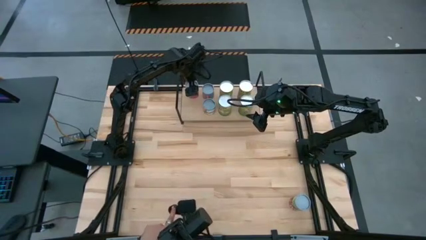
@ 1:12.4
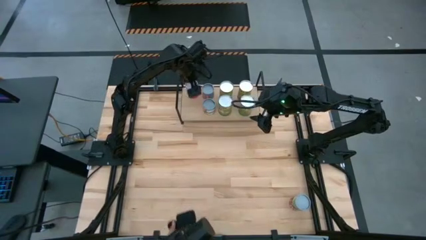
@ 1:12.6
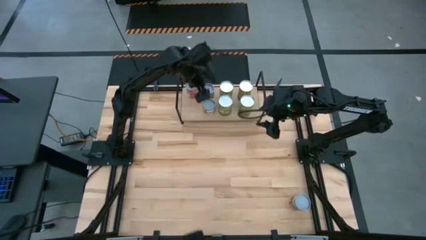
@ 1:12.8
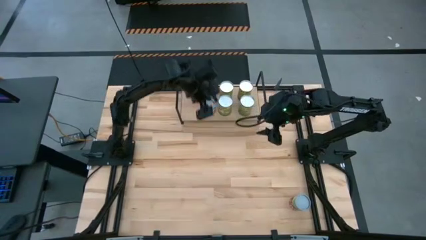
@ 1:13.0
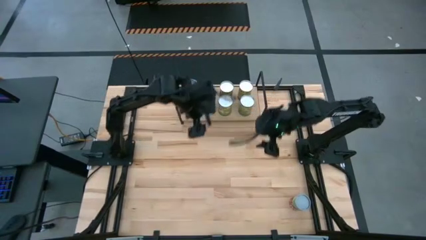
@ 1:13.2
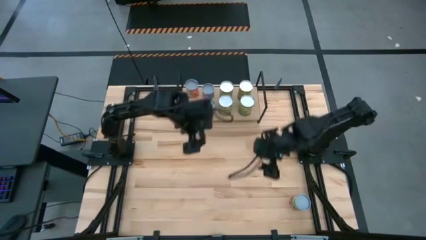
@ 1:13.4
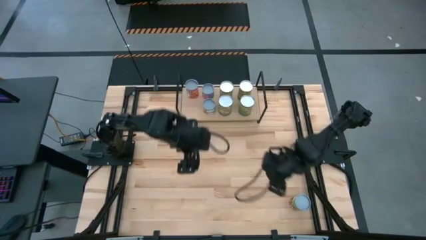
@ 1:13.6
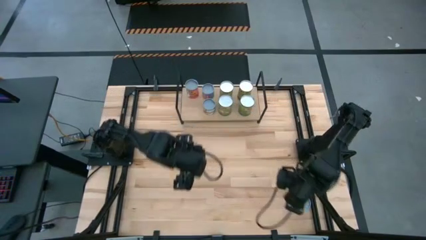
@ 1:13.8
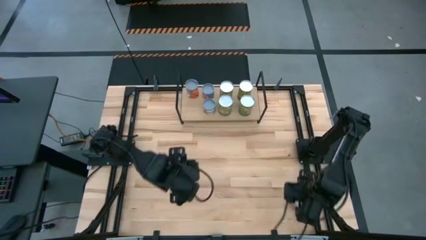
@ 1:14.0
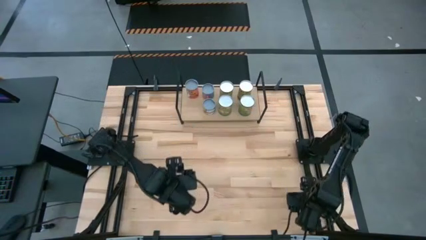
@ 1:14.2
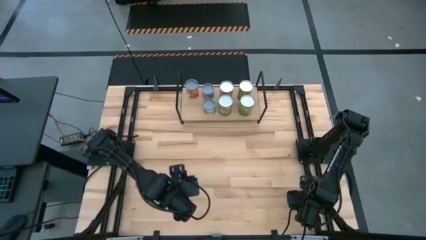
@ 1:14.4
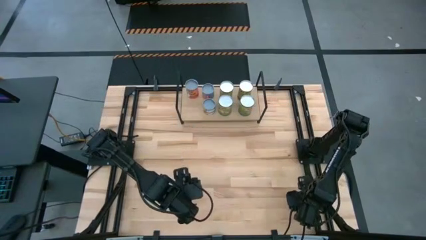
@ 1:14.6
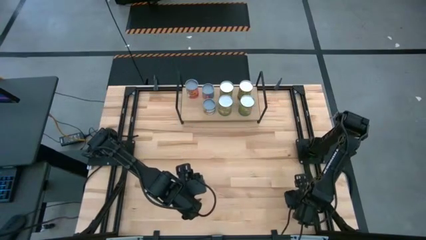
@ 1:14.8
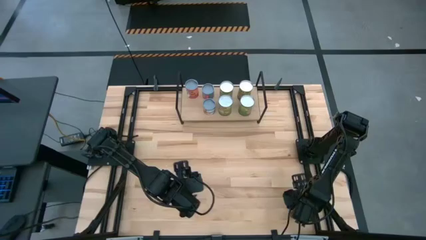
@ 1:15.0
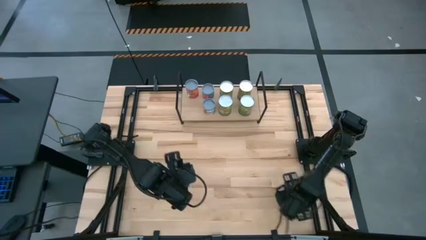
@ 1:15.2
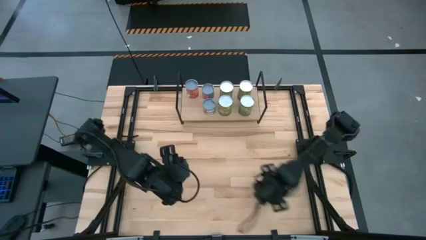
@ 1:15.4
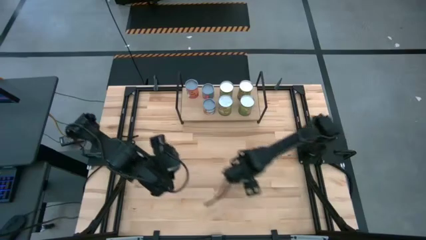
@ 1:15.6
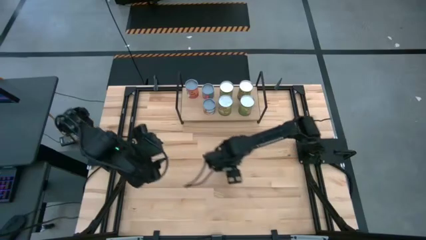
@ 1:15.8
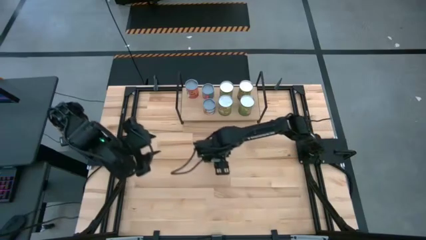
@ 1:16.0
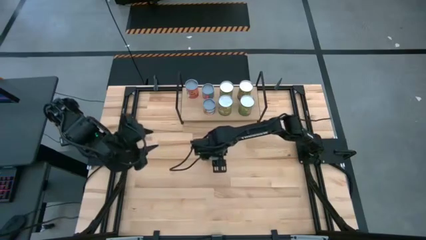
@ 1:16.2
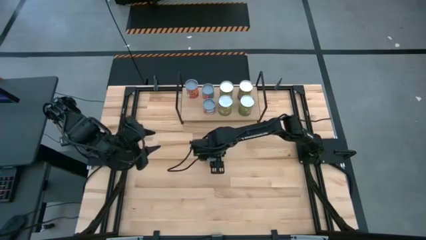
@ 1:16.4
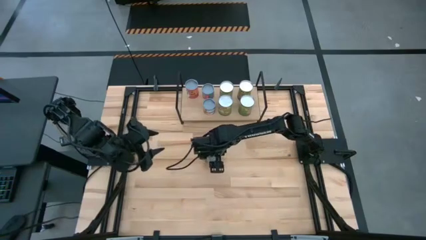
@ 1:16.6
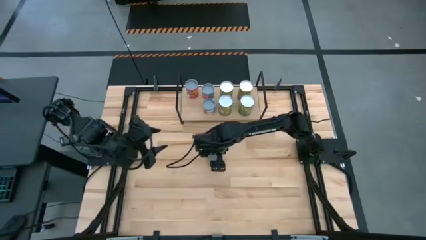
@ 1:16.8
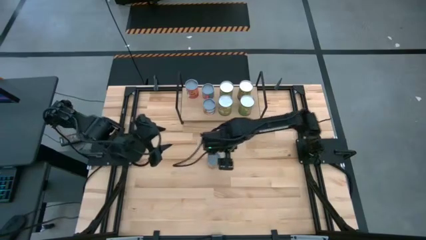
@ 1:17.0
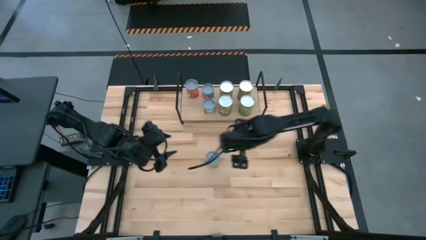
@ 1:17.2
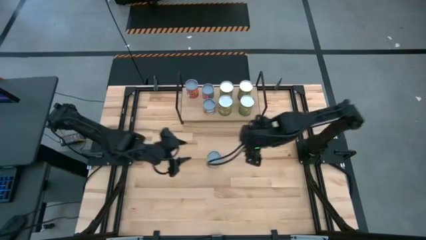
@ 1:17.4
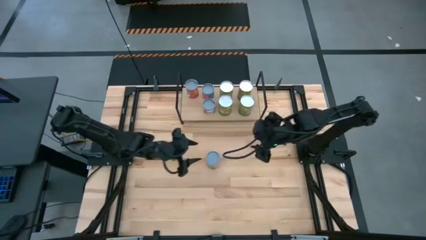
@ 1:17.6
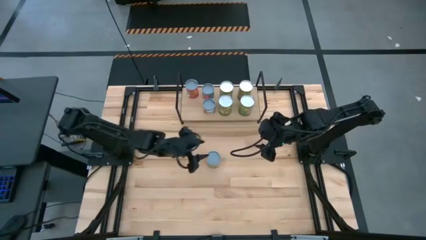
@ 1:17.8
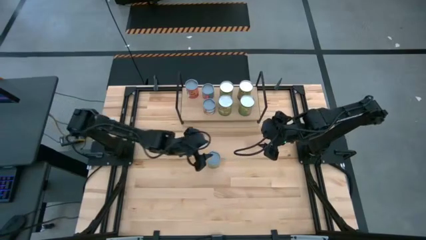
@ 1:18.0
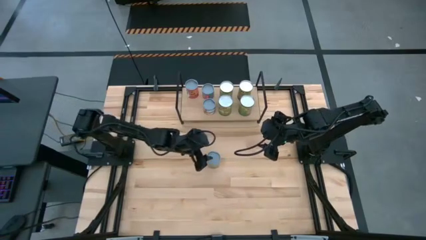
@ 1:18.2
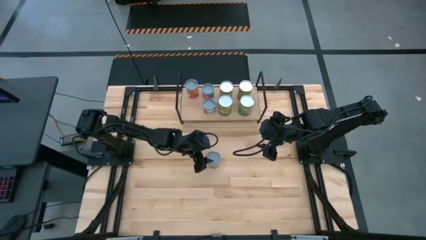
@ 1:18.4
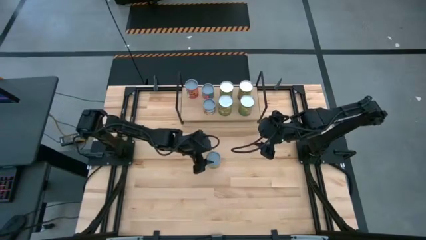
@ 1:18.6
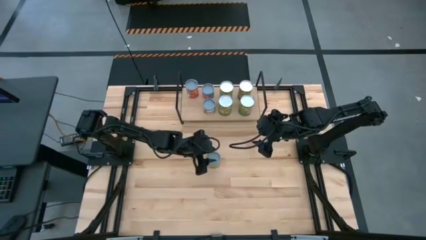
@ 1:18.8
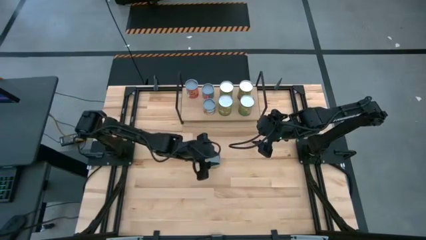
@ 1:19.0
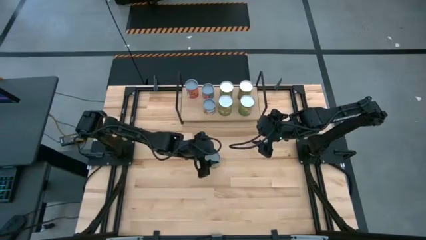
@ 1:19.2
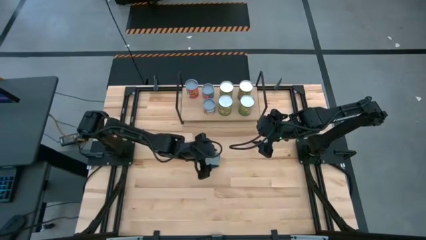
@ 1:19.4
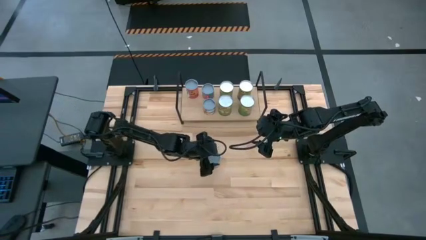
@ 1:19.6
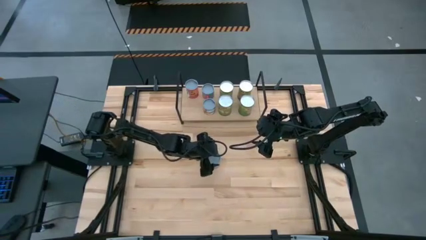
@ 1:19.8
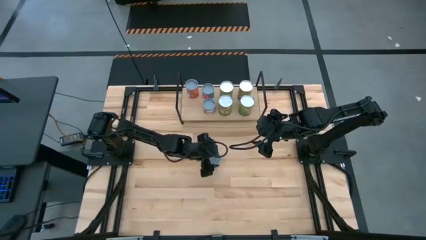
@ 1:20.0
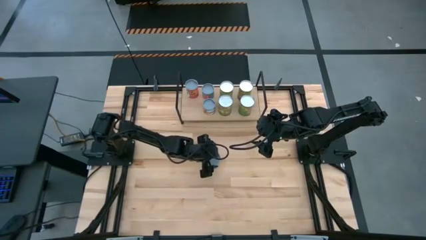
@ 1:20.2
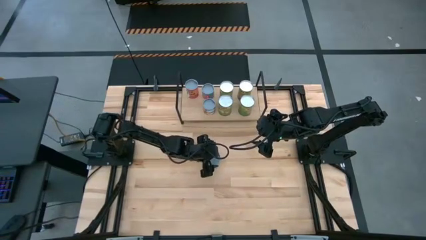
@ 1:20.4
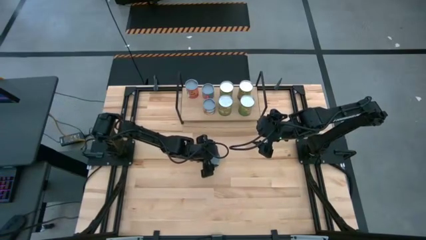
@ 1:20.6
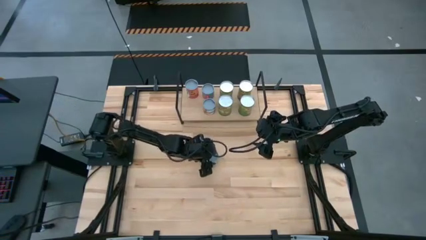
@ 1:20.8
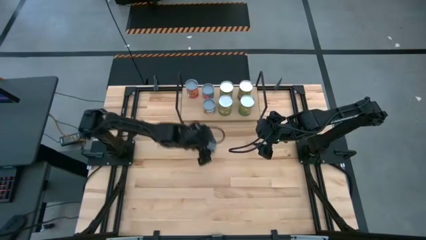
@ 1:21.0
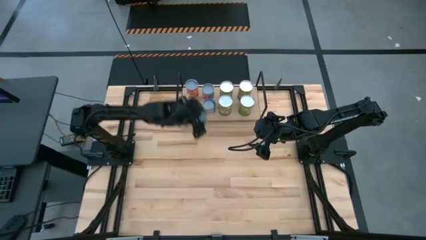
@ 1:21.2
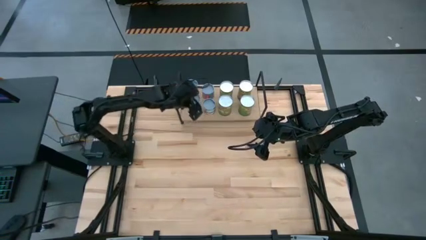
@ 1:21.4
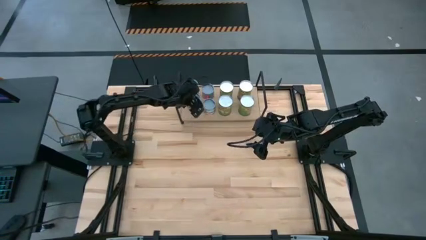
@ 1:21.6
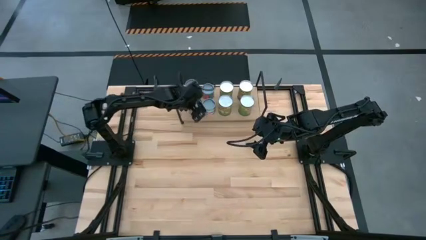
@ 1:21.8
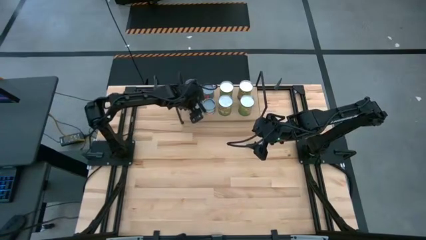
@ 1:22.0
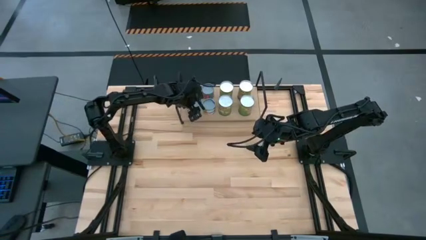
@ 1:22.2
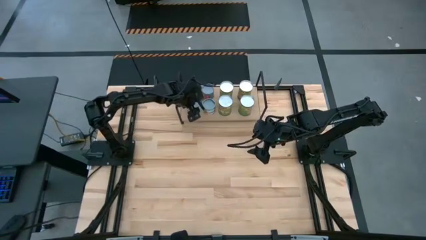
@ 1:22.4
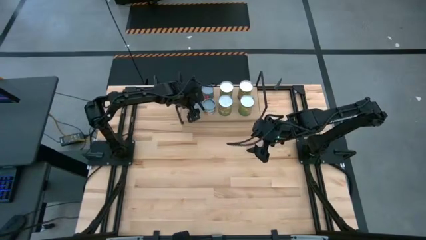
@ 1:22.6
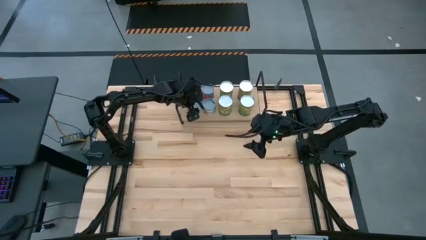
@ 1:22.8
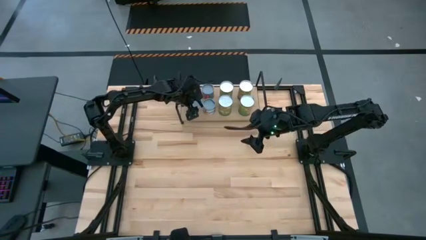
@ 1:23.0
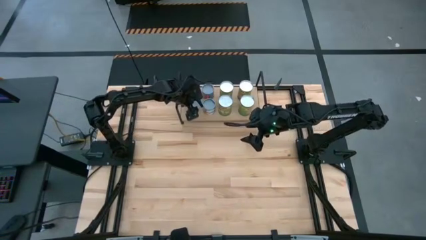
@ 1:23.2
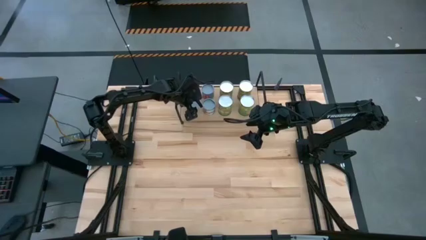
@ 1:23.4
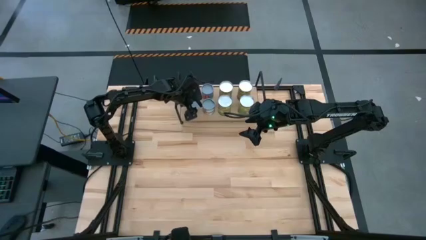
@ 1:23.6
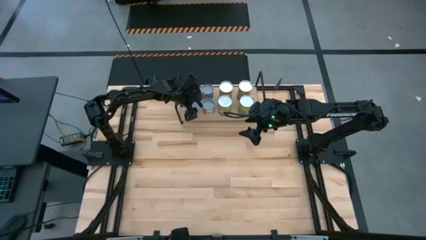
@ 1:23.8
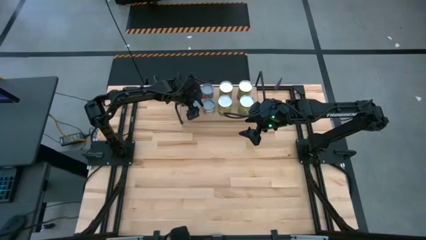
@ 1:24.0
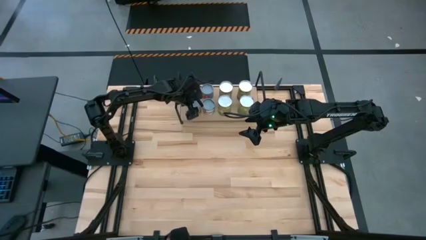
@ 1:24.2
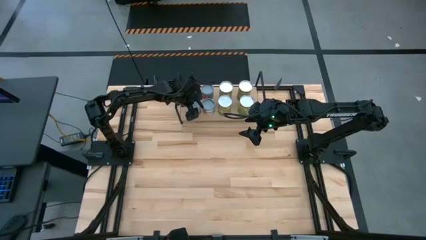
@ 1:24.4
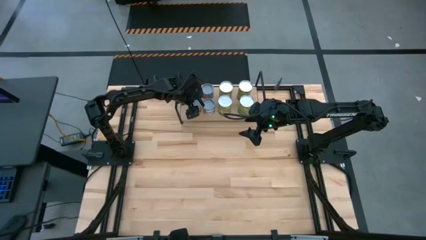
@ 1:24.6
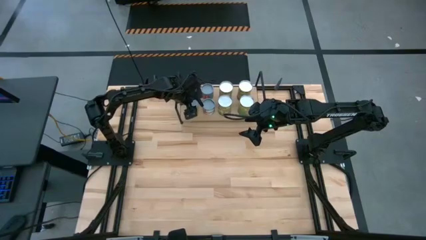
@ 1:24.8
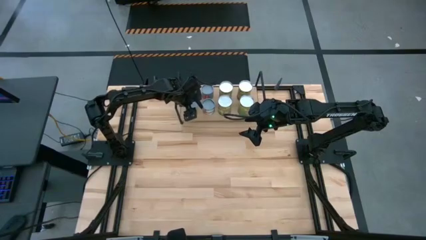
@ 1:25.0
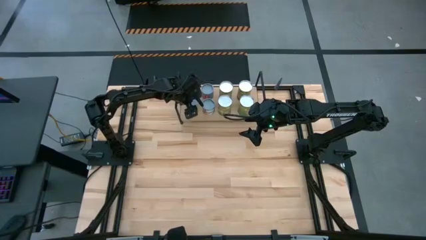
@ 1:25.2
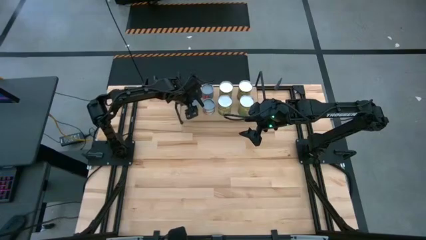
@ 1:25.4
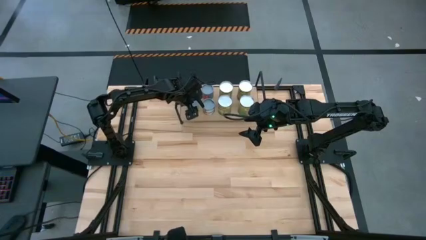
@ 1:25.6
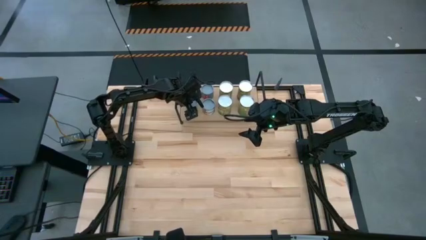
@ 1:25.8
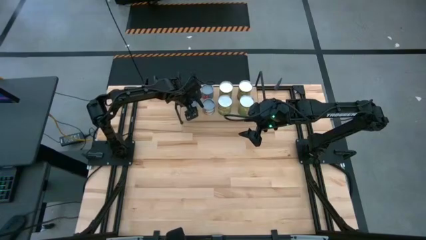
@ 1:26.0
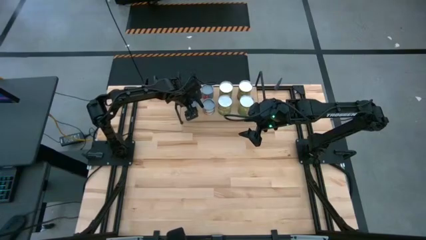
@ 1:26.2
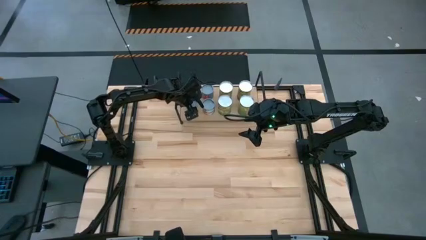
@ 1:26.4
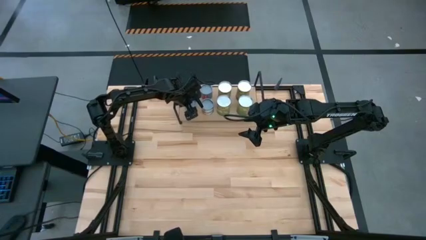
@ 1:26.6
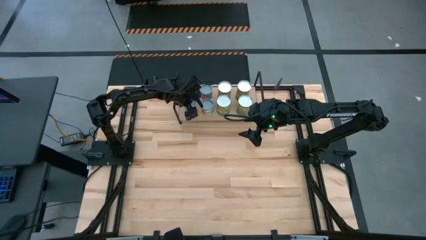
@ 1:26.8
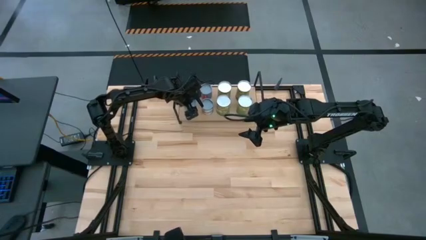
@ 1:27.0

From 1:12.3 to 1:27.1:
Task: Pick and place cans onto a shelf
Put the canned spaghetti sauce on the shelf
